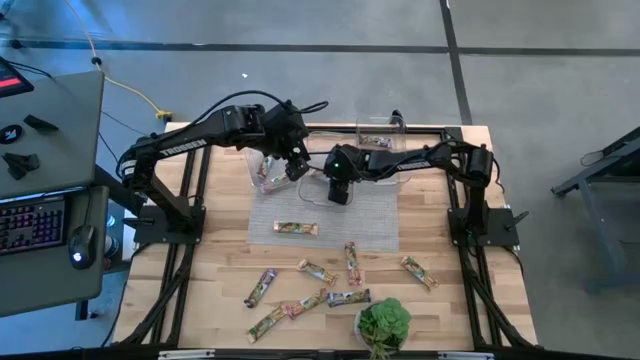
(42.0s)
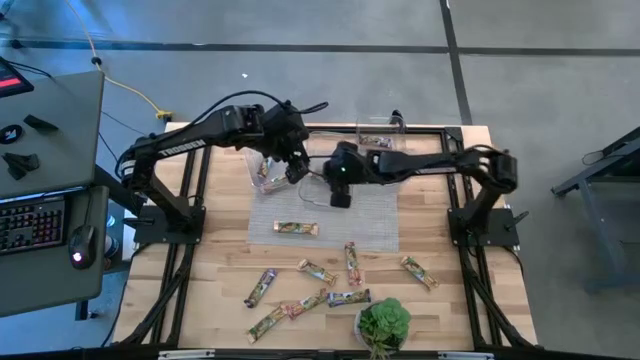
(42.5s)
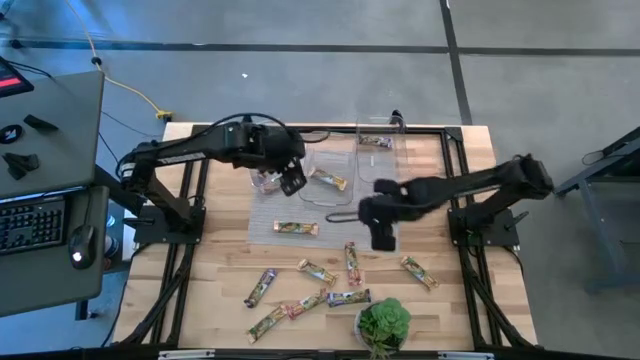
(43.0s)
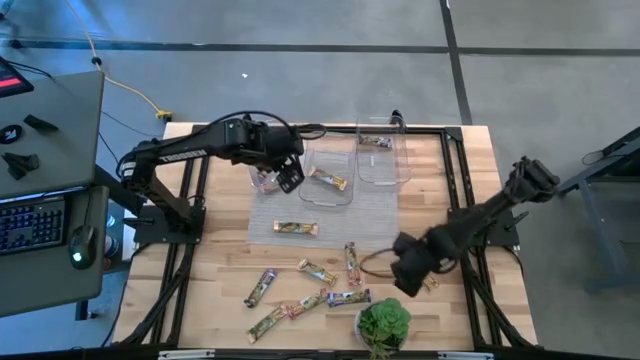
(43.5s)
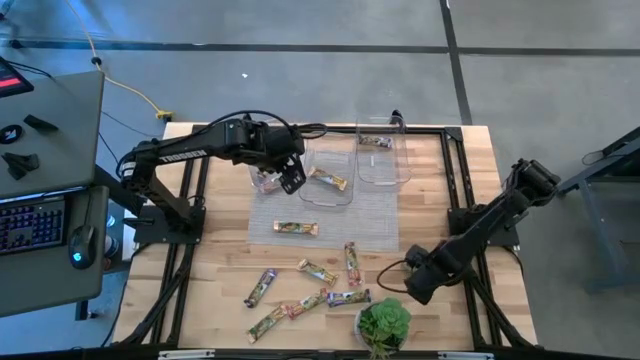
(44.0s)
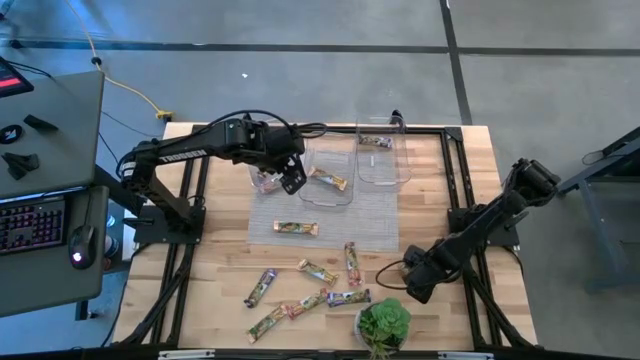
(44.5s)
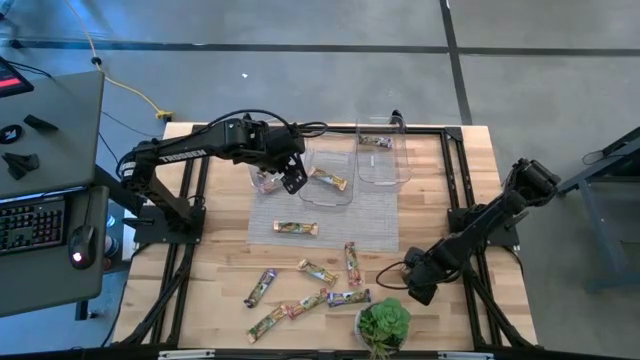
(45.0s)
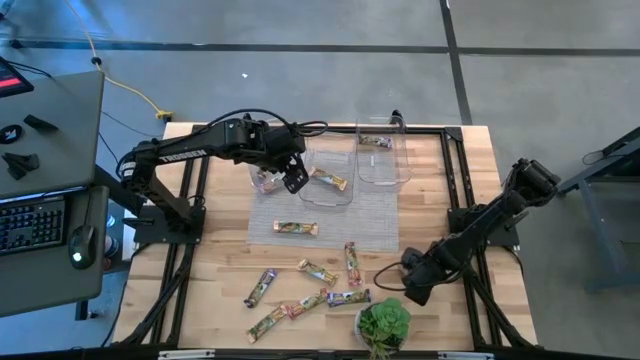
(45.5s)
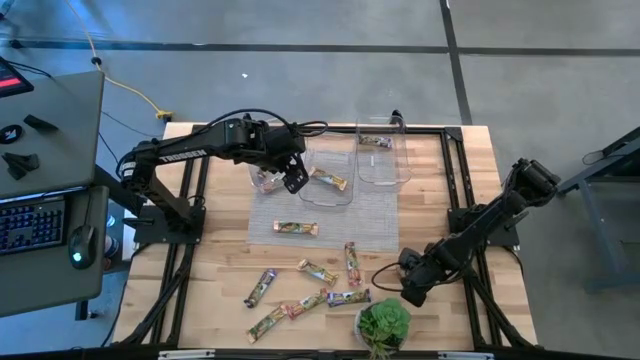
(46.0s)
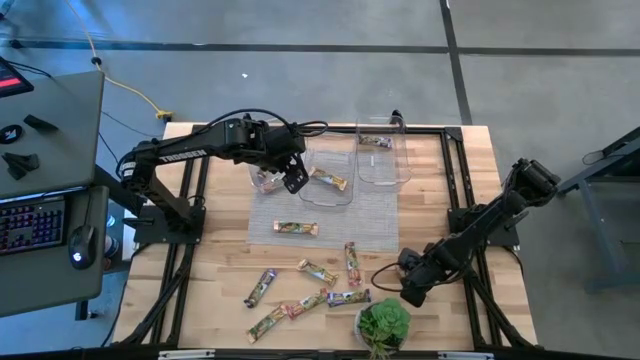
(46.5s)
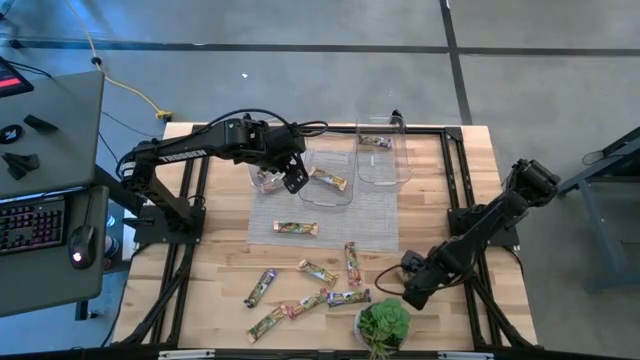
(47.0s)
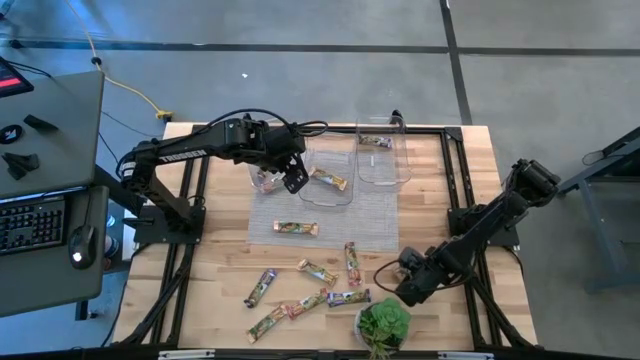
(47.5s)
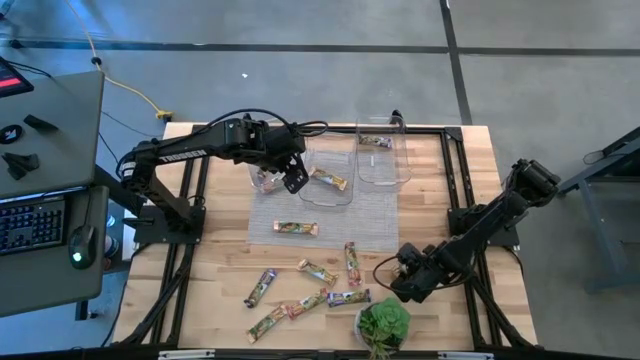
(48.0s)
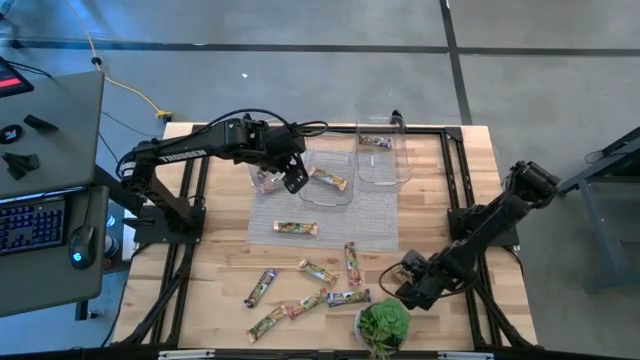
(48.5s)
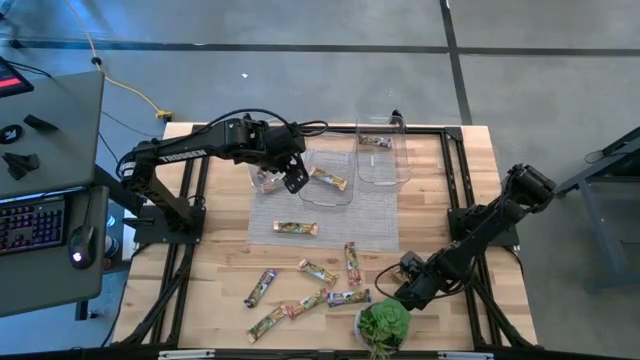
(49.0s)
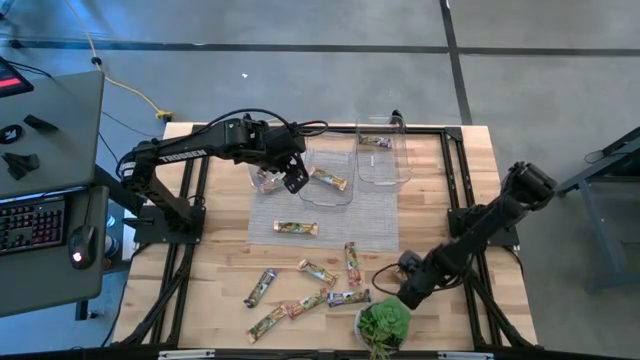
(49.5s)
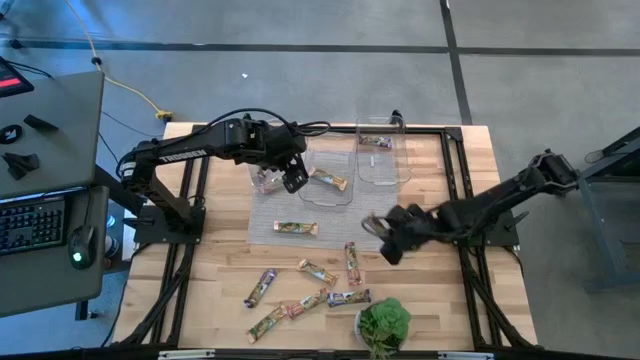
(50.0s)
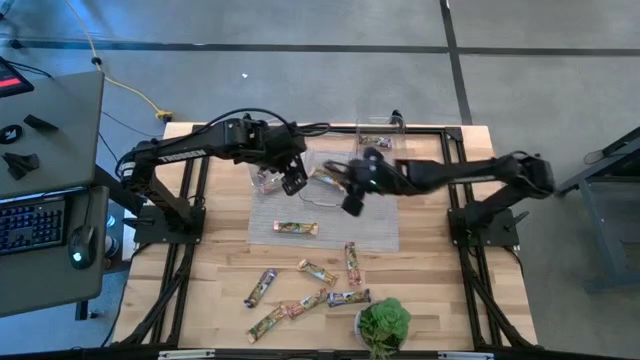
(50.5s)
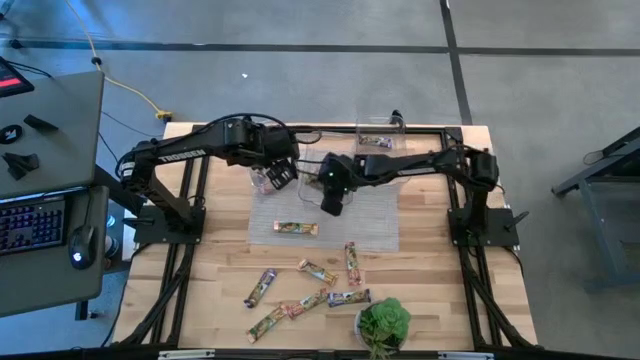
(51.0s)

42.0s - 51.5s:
Task: Pick and place Granola Bars by type
Put the orange granola bar into the middle transparent bin

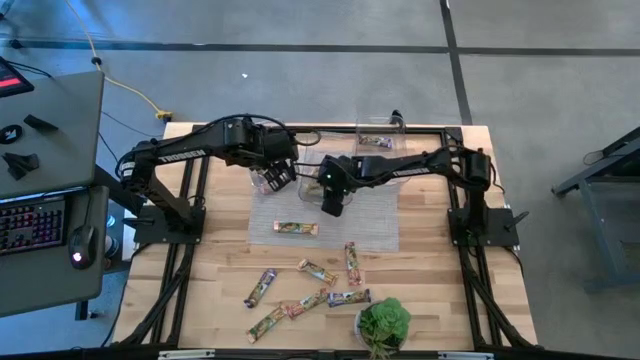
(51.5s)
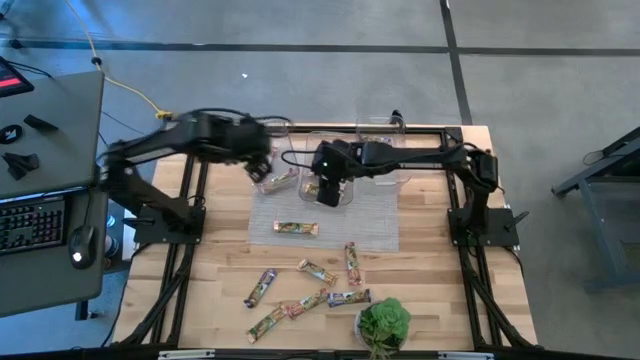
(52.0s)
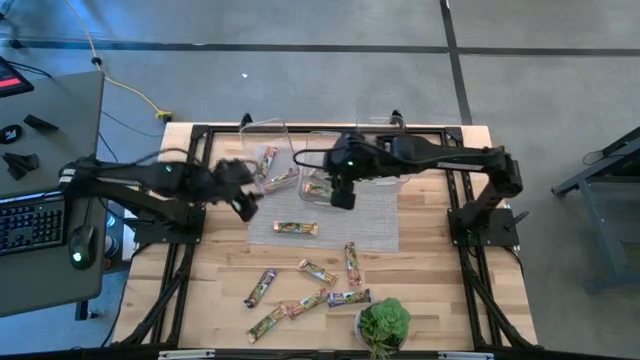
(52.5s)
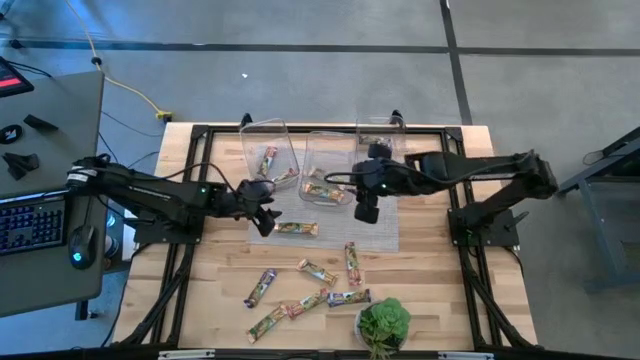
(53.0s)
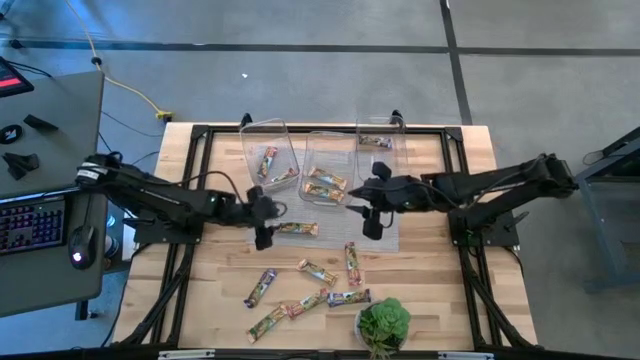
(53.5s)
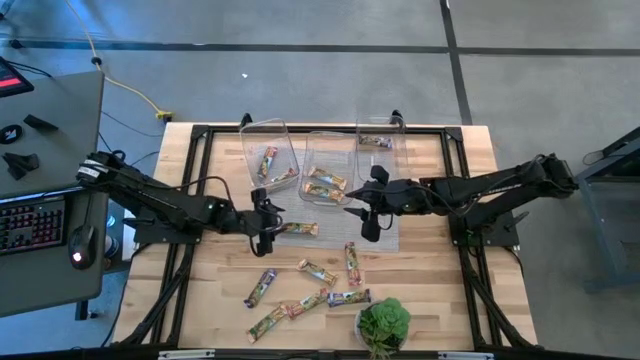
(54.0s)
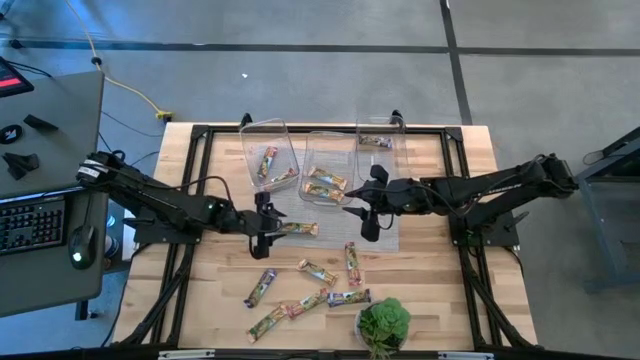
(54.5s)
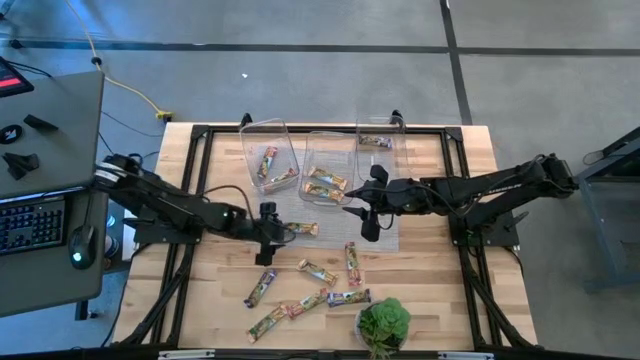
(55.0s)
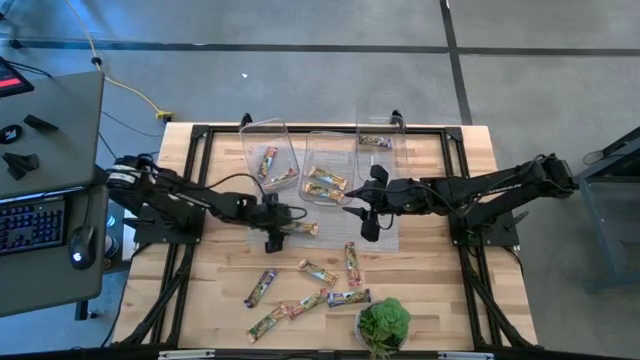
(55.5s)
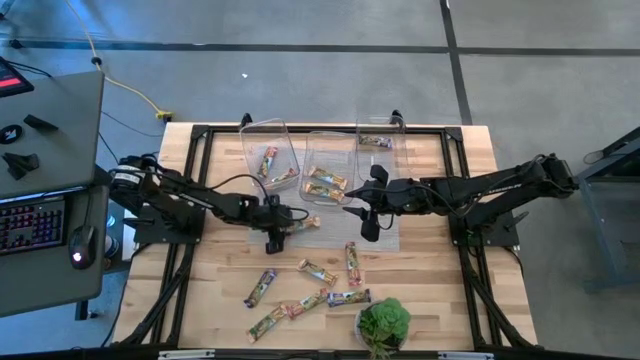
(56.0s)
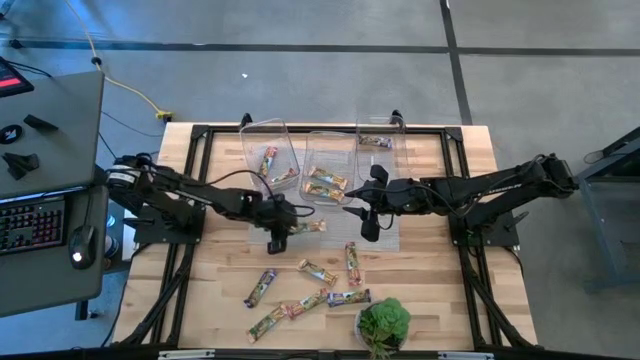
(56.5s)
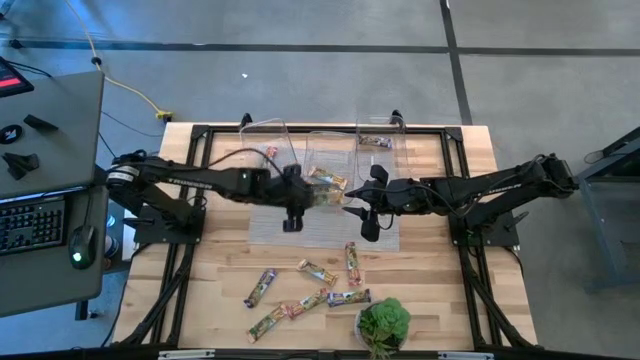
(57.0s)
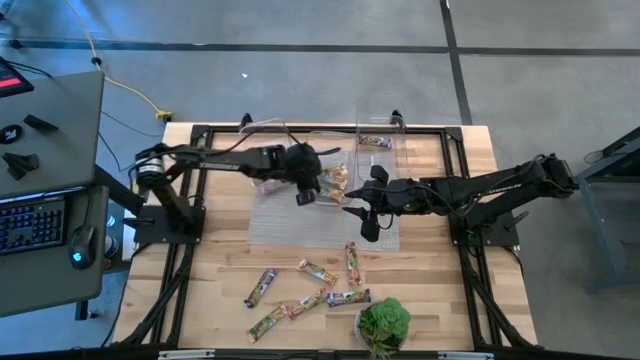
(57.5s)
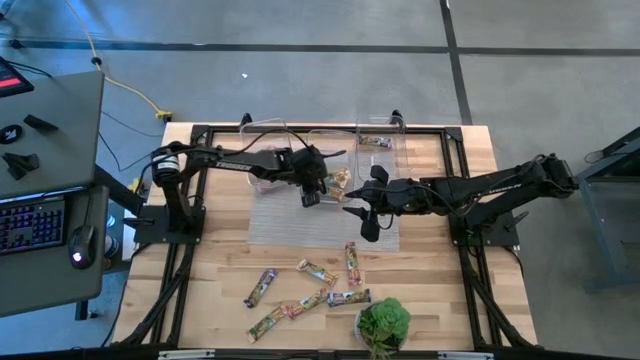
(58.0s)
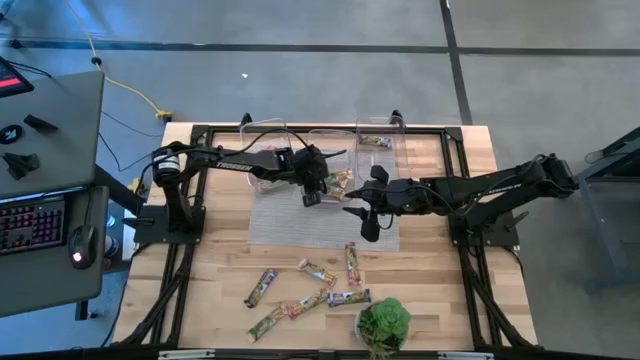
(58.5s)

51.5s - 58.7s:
Put the orange granola bar into the middle transparent bin

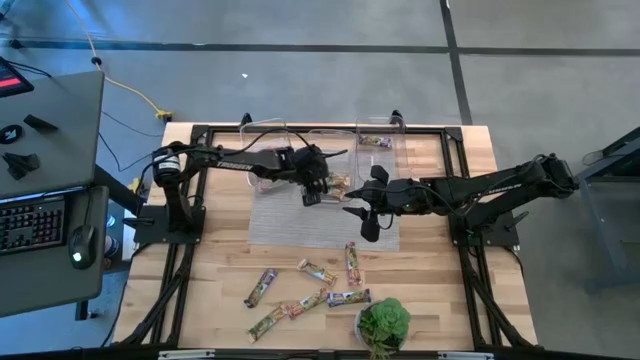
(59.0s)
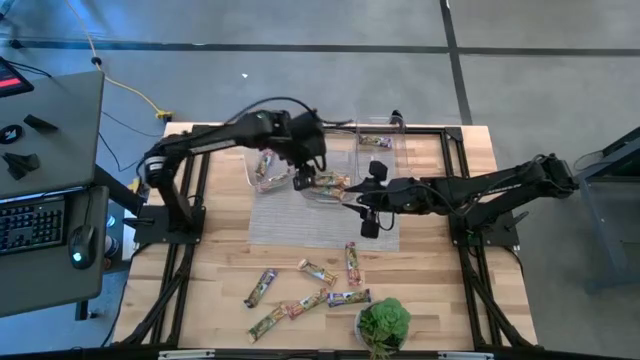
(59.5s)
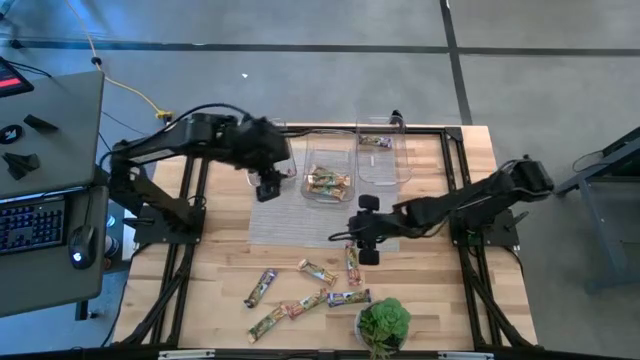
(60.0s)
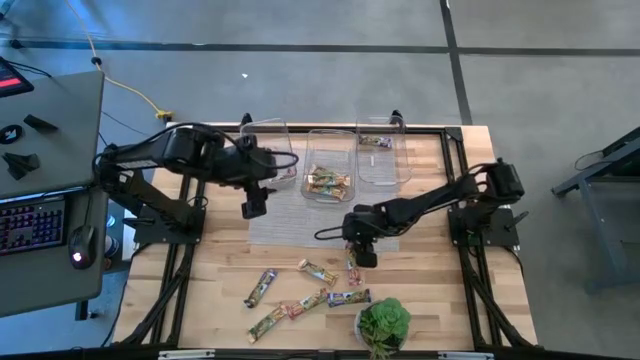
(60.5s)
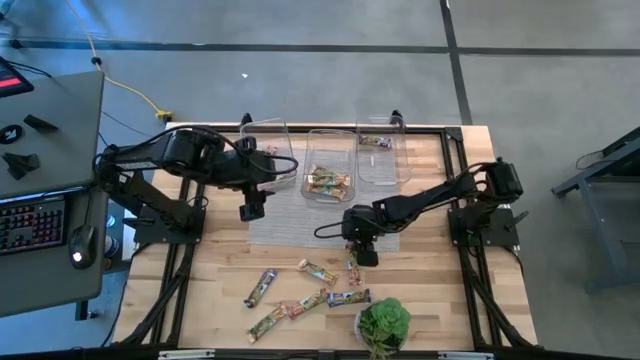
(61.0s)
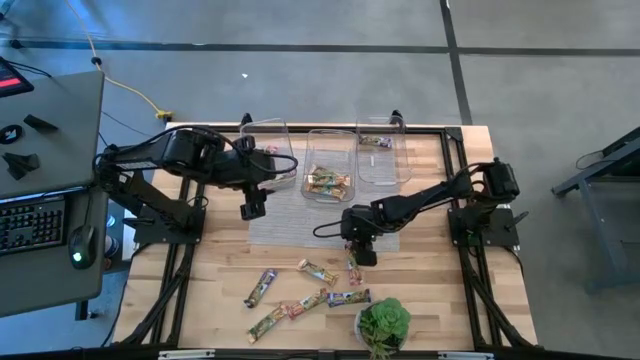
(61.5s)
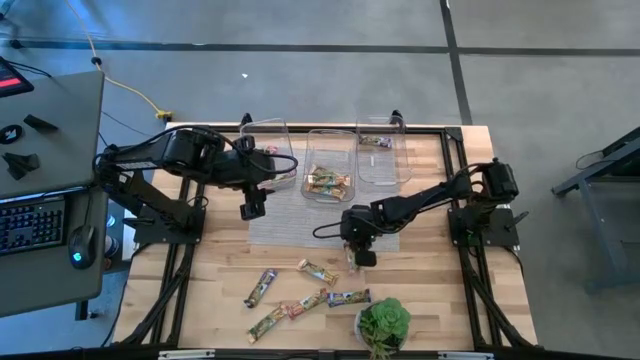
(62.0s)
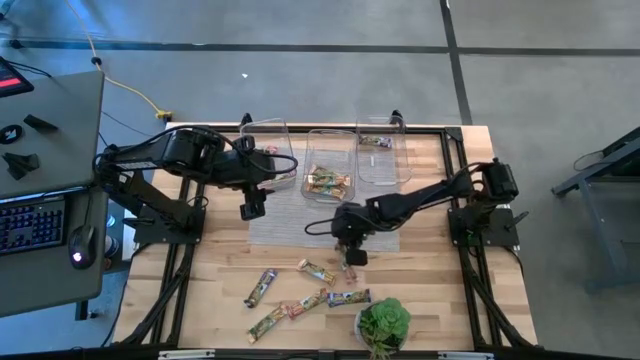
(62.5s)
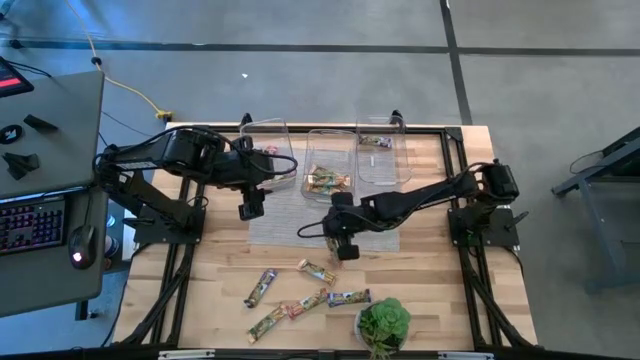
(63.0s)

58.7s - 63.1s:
Put the red granola bar into the left transparent bin

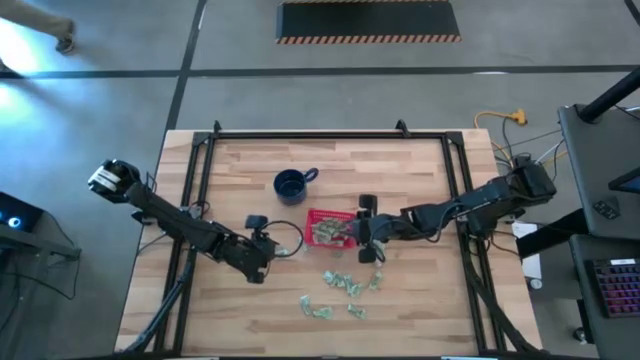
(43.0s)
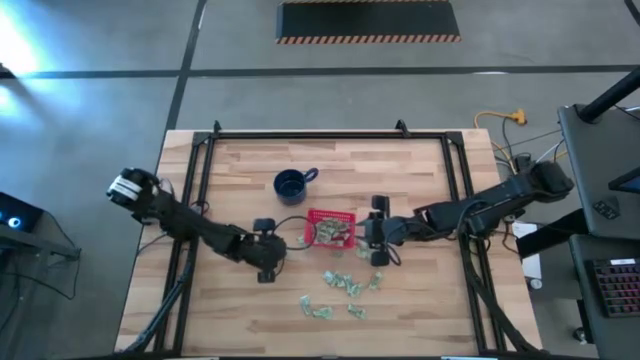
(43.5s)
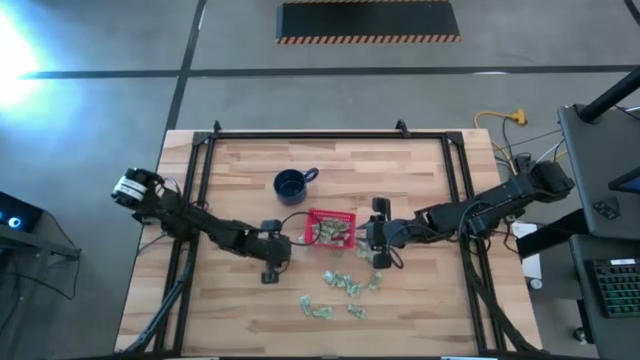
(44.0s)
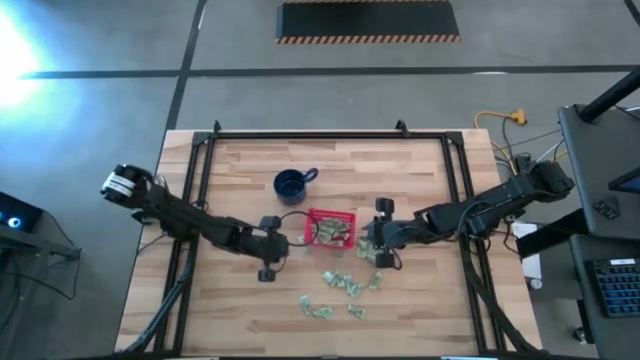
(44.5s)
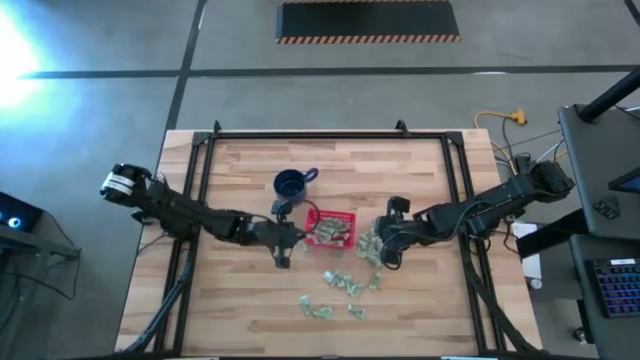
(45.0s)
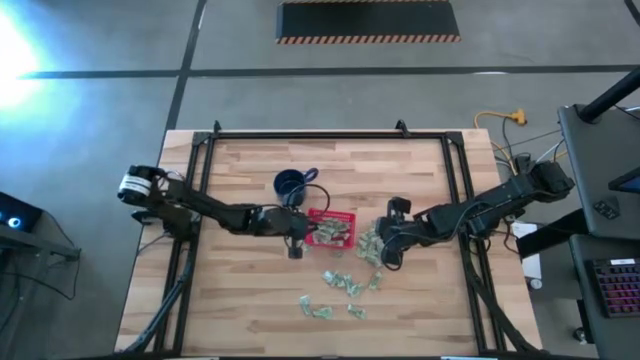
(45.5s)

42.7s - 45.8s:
Task: Pick and place Stevia / Truvia into bins
Put the white stevia packet into the red basket
